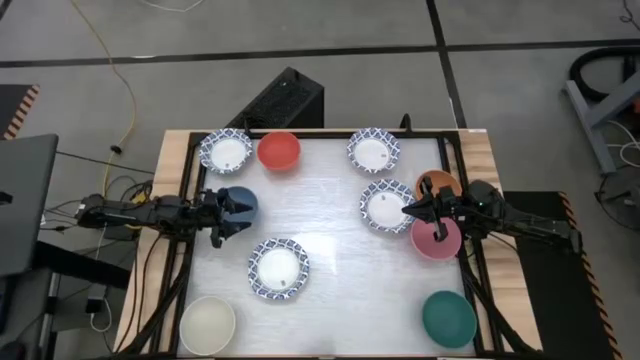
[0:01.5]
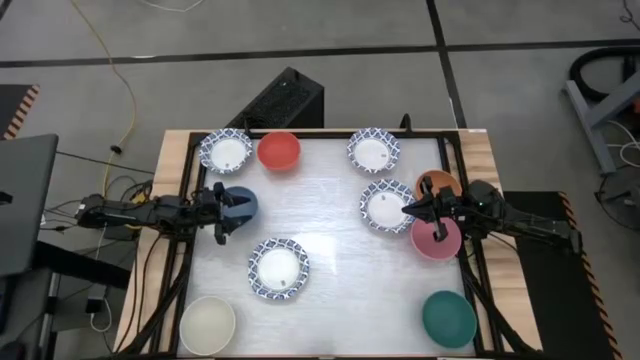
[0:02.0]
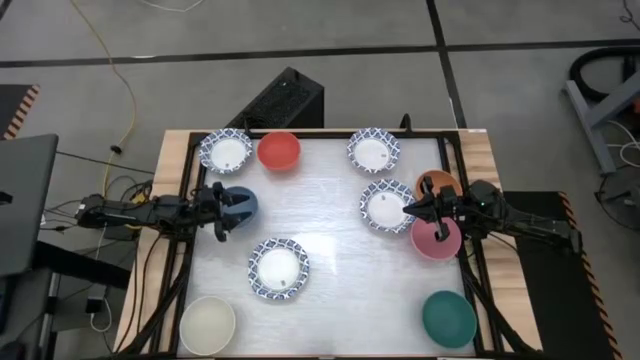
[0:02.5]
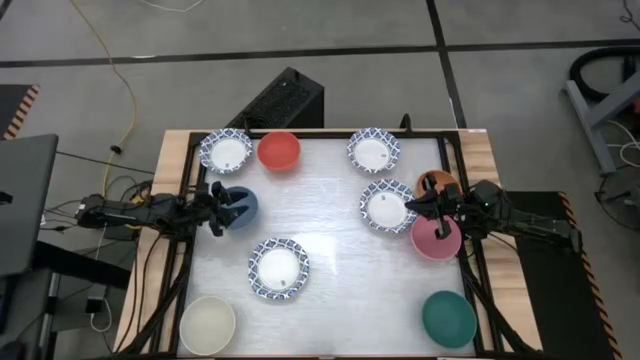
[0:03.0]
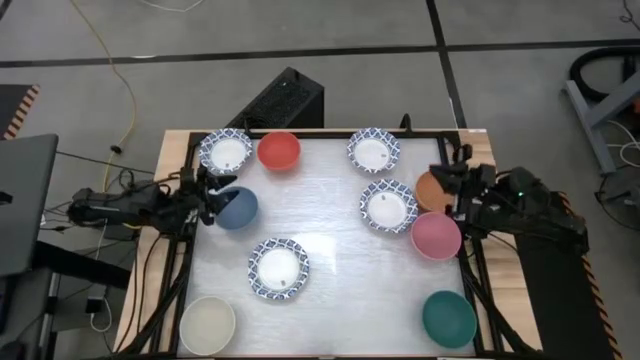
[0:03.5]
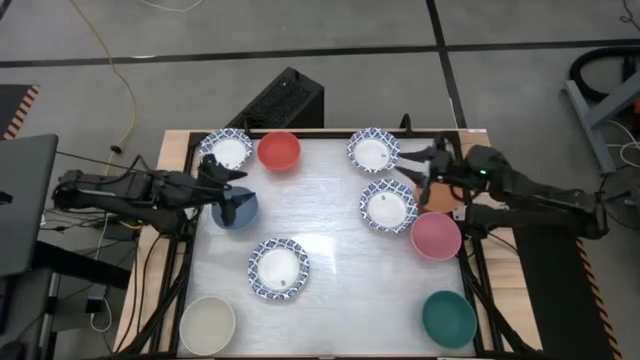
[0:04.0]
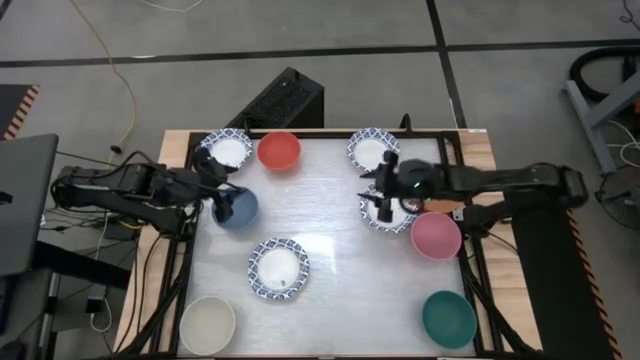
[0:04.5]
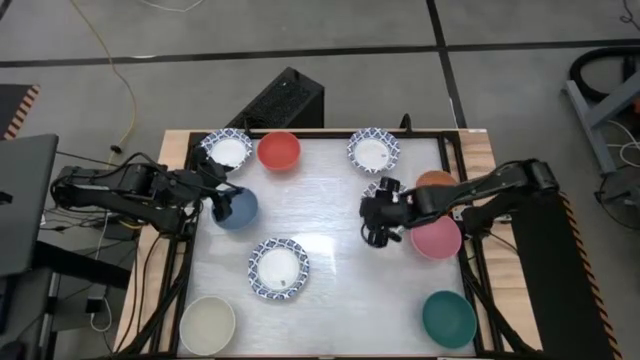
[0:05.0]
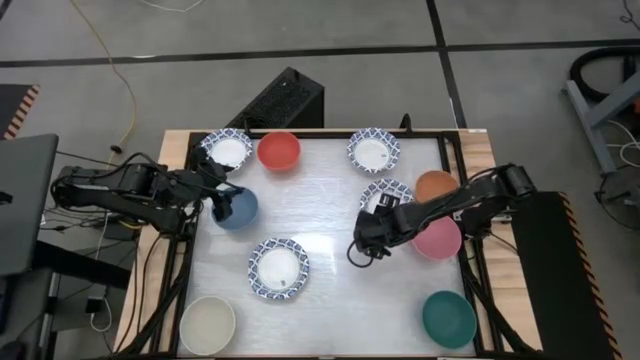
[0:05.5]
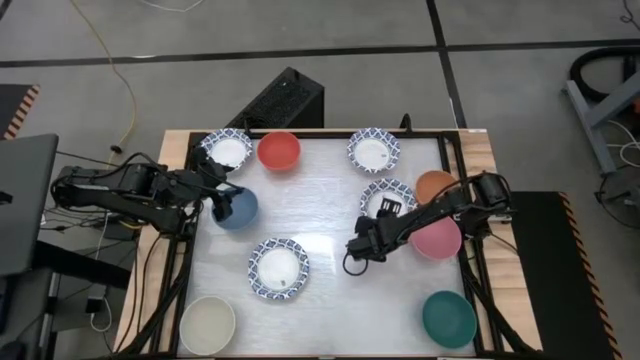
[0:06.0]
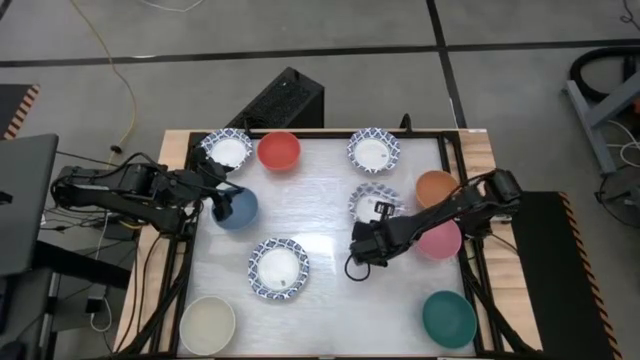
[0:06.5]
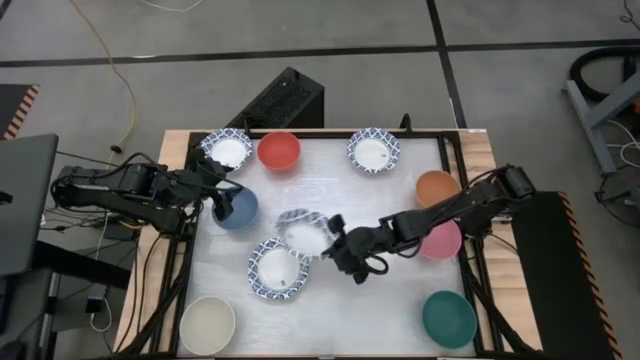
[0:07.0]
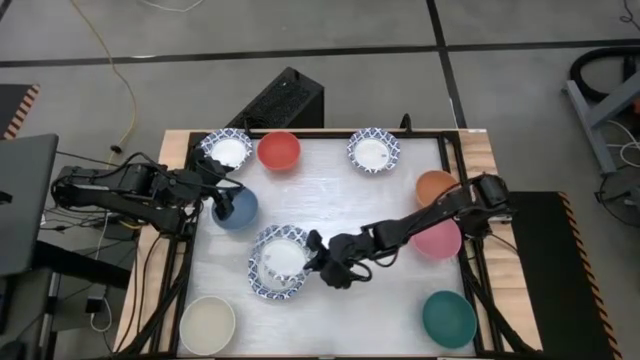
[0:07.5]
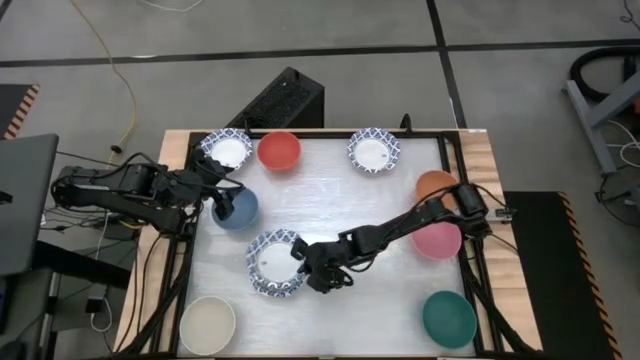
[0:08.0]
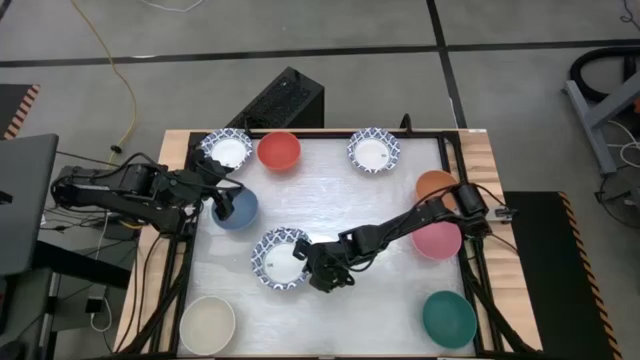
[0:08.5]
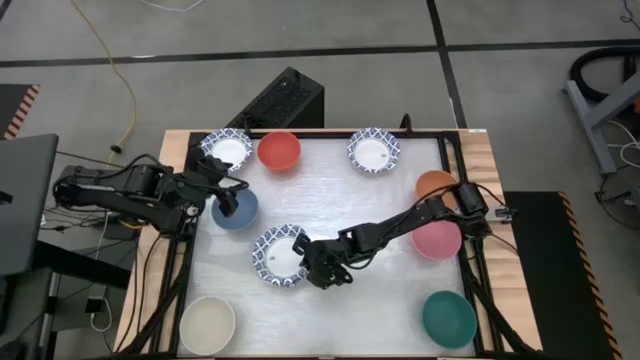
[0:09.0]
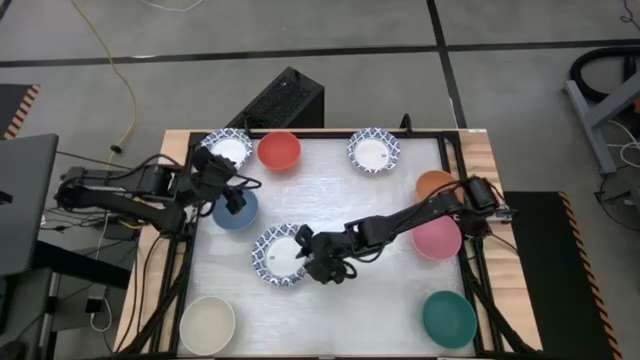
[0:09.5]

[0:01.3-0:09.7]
Stack the middle right white and blue bowl on top of the bottom left white and blue bowl

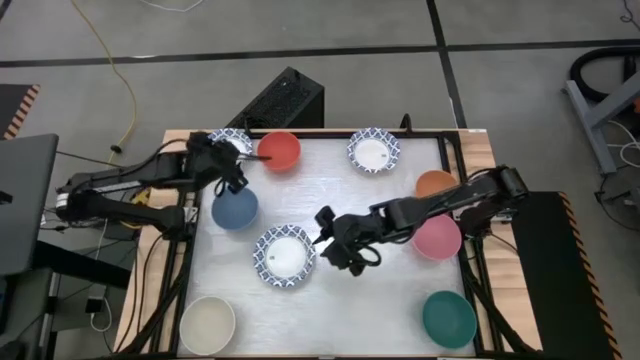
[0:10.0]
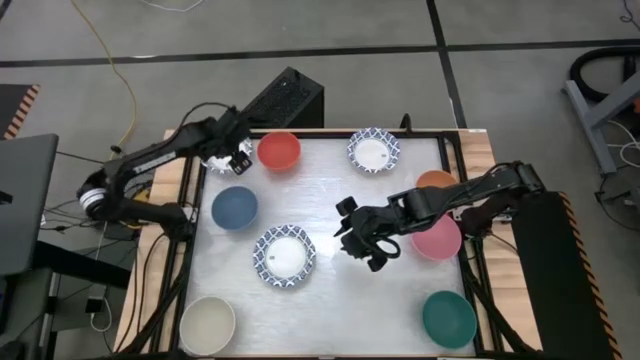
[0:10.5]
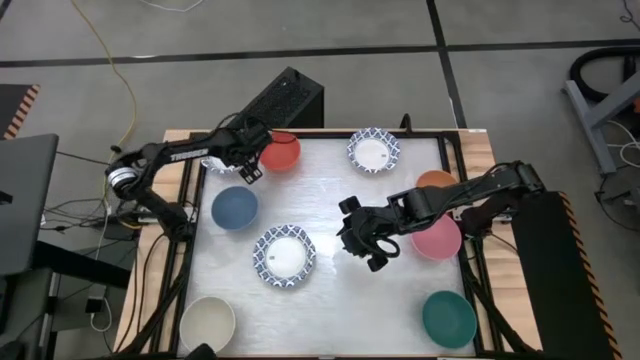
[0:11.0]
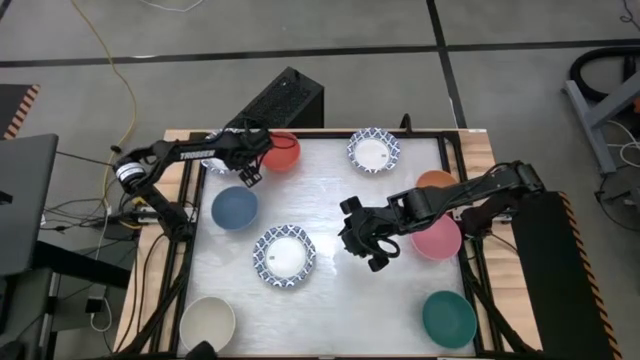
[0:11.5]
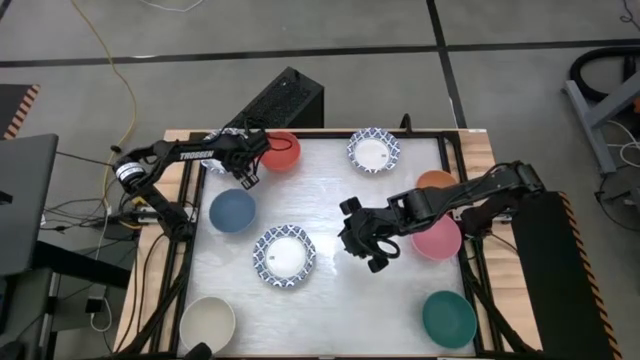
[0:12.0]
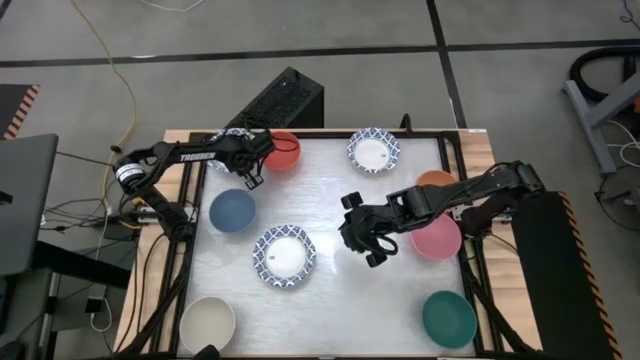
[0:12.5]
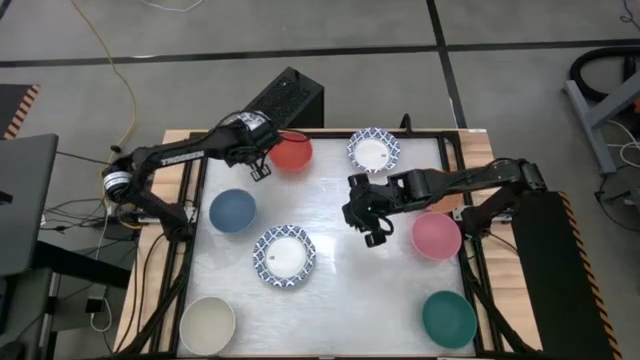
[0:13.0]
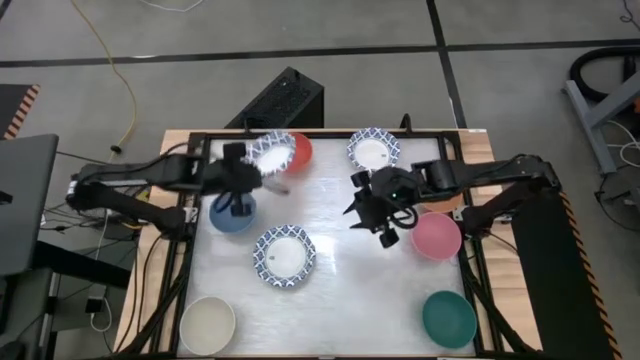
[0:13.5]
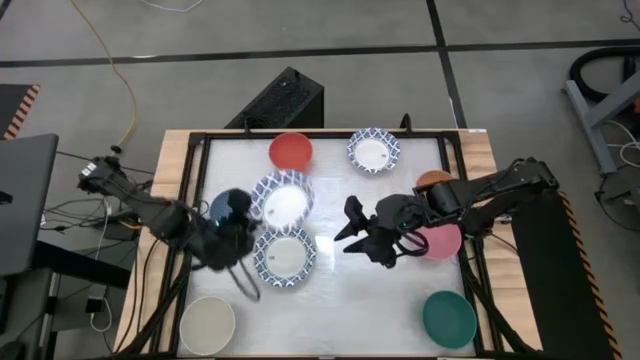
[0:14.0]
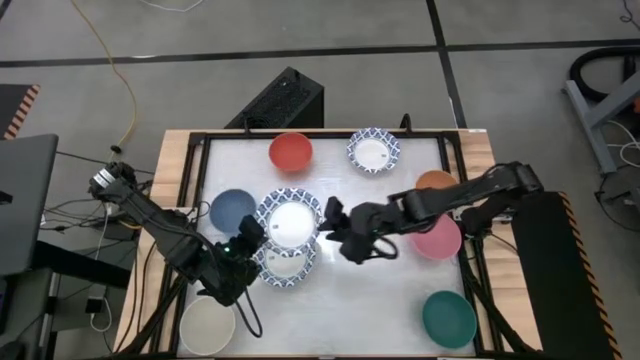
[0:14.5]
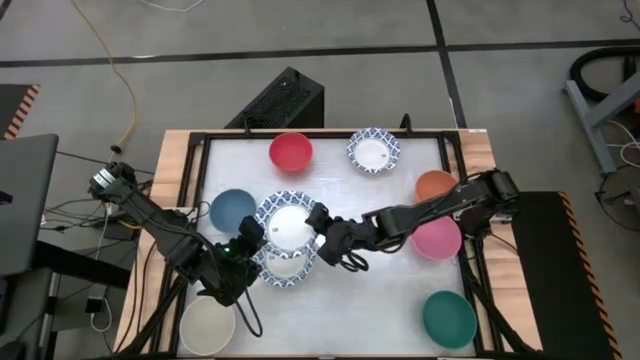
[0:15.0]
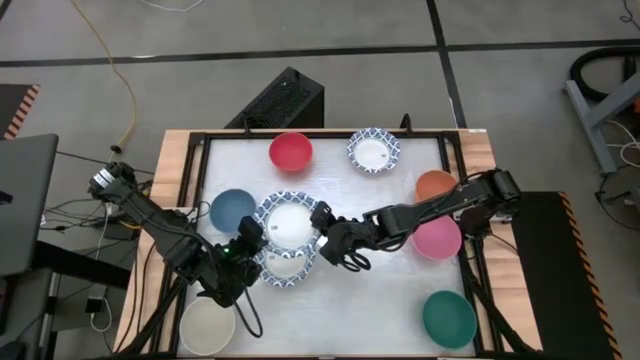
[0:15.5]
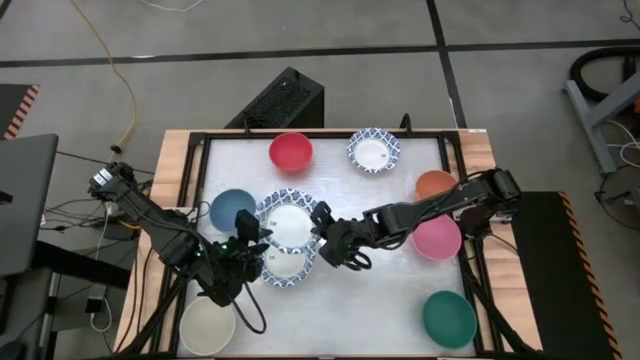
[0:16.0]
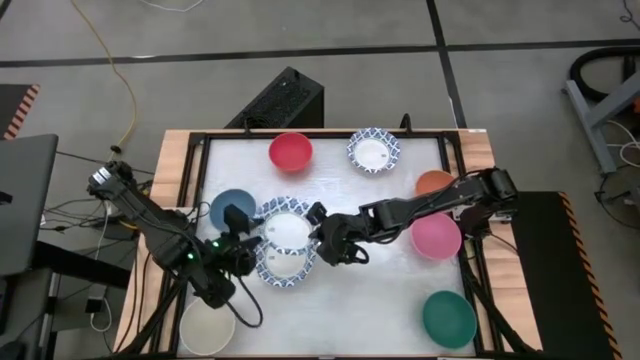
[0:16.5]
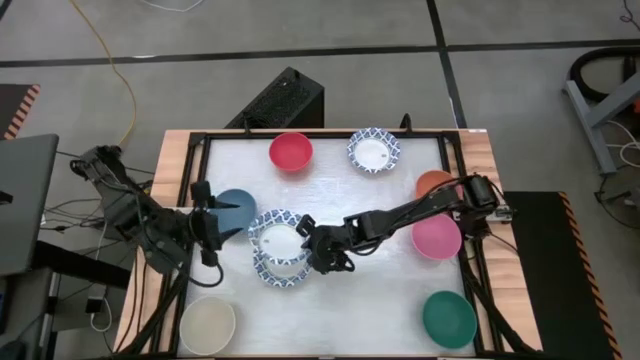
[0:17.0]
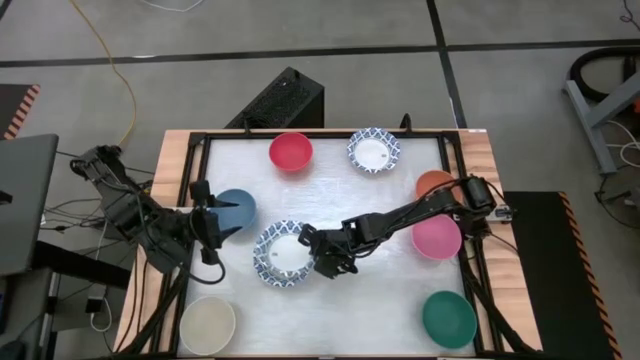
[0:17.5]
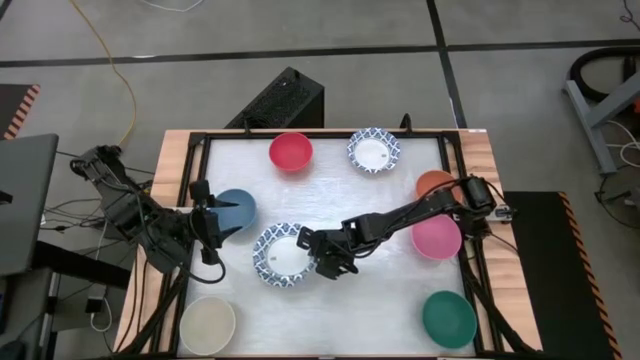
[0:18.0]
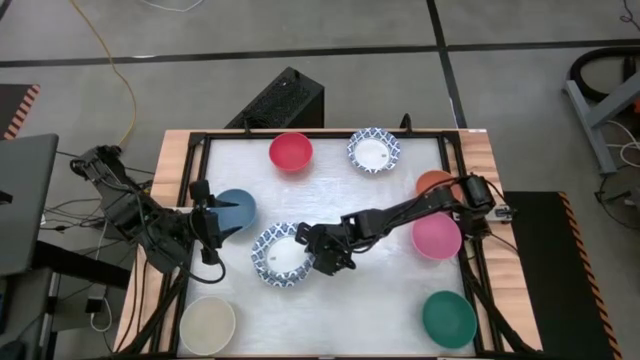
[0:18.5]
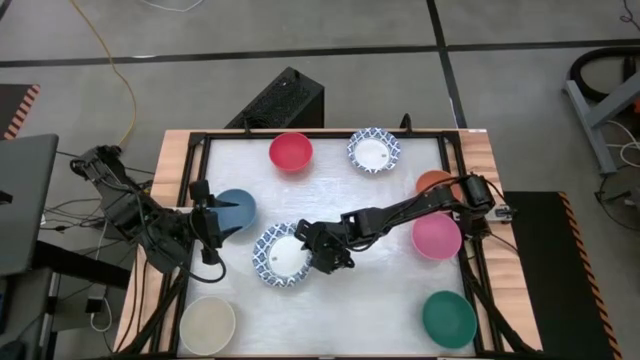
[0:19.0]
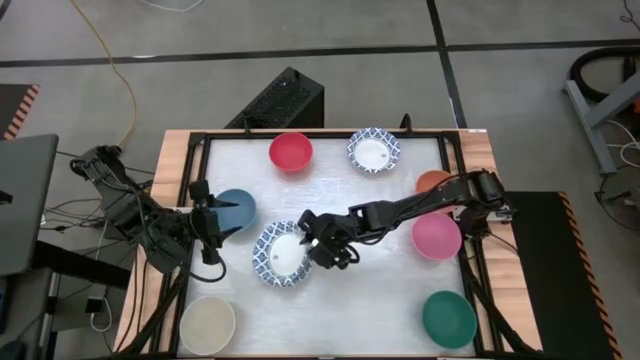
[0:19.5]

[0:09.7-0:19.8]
Stack the top left white and blue bowl on top of the bottom left white and blue bowl

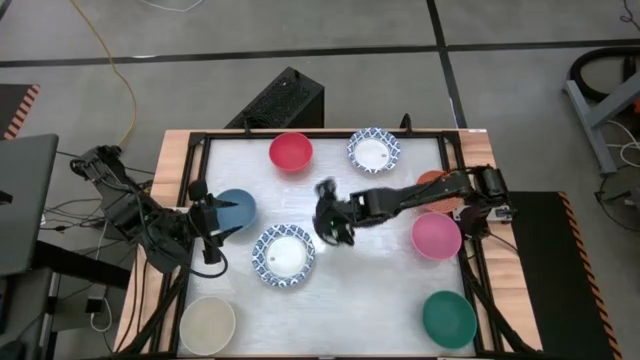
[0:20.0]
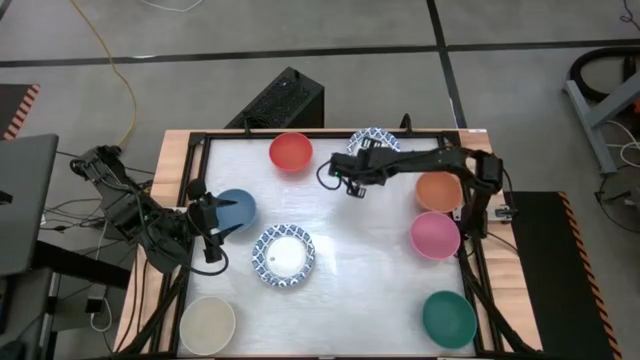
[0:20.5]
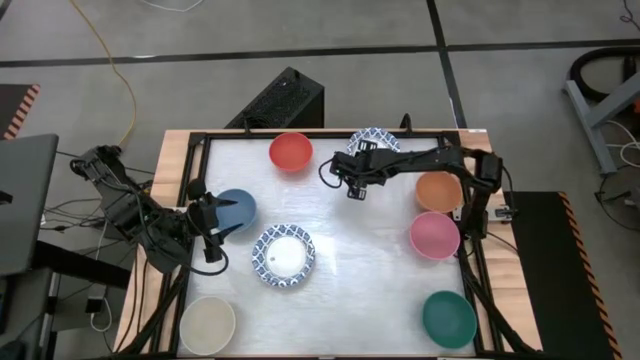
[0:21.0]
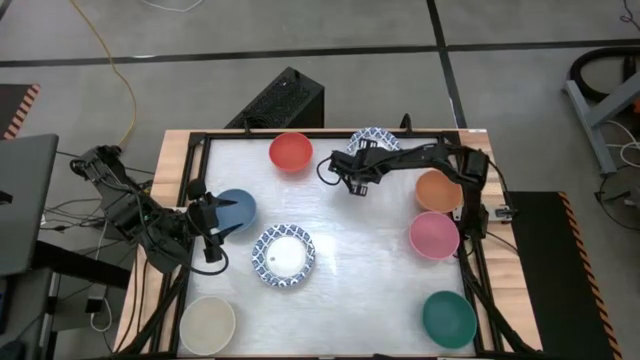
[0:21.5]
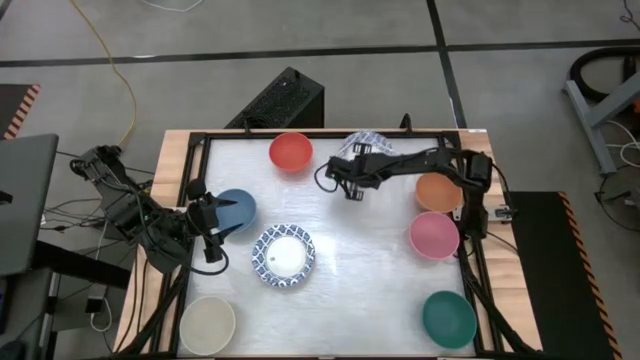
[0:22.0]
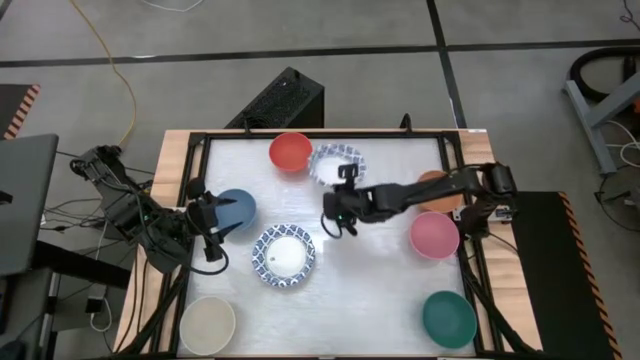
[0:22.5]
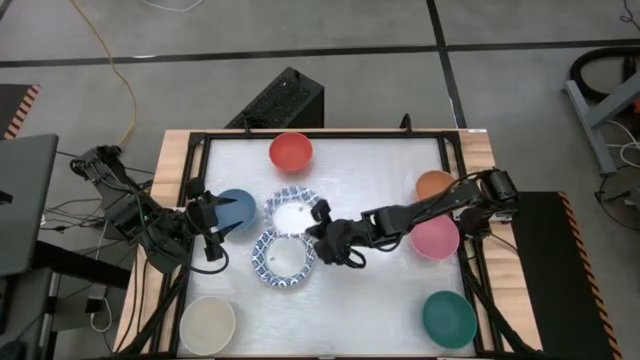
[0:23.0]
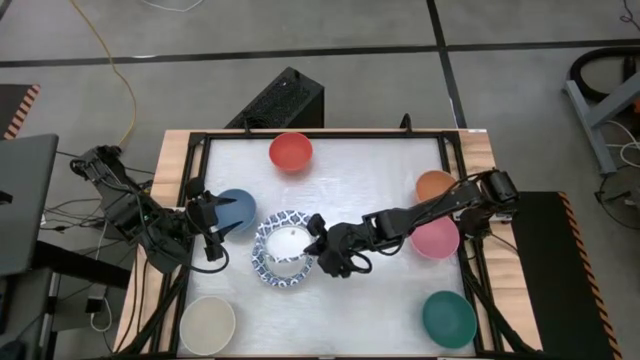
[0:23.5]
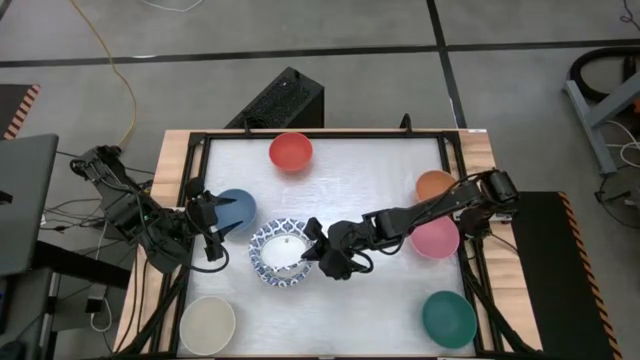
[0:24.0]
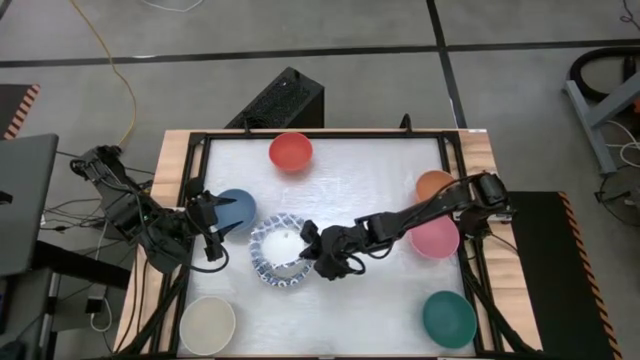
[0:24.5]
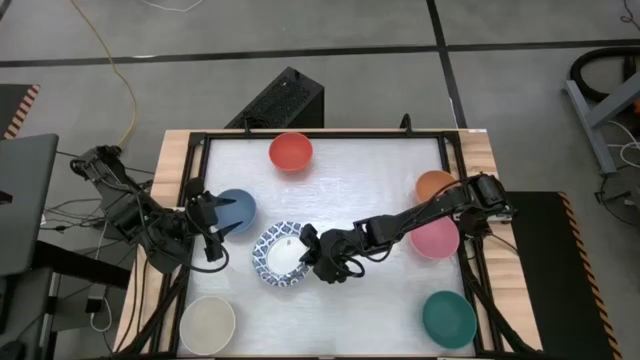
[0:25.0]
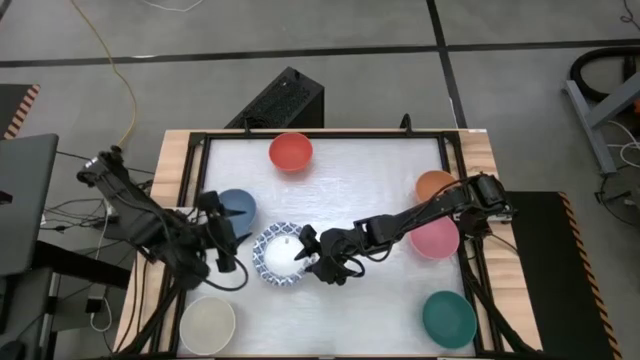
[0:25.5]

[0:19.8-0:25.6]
Stack the white and blue bowl on top of the white and blue bowl
